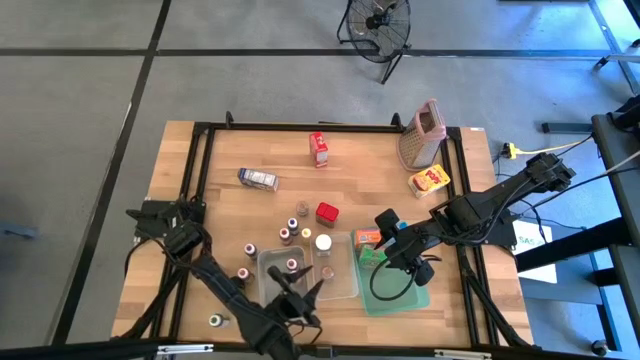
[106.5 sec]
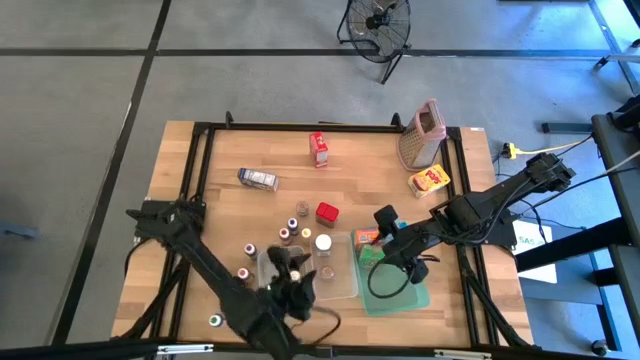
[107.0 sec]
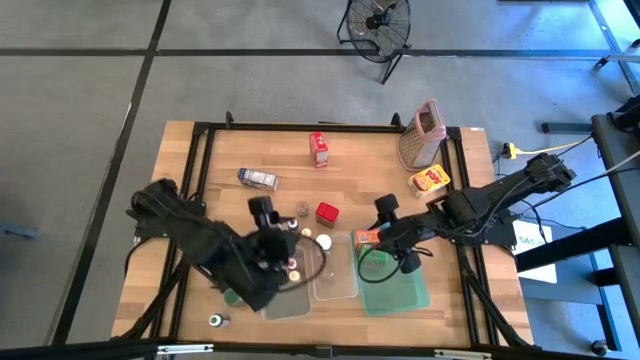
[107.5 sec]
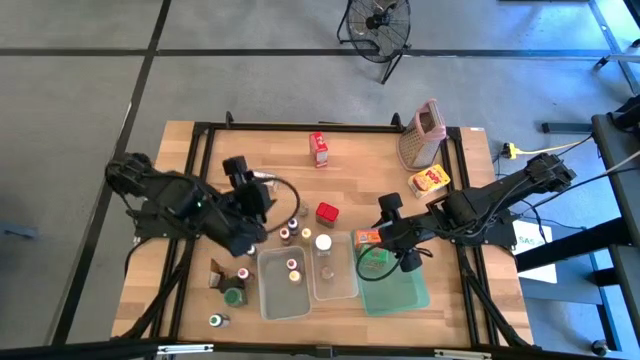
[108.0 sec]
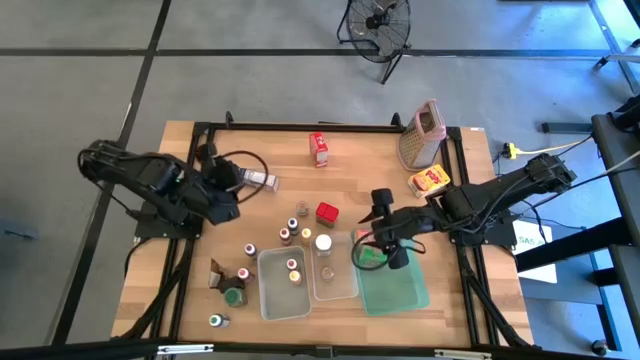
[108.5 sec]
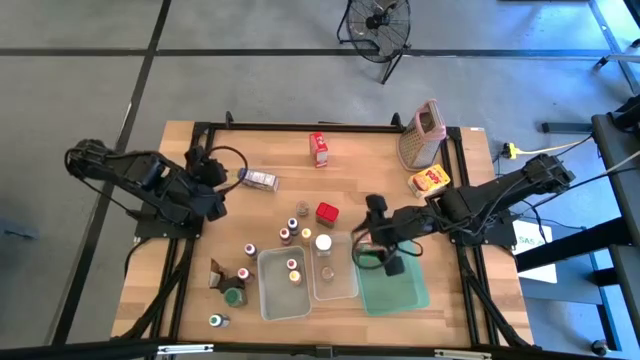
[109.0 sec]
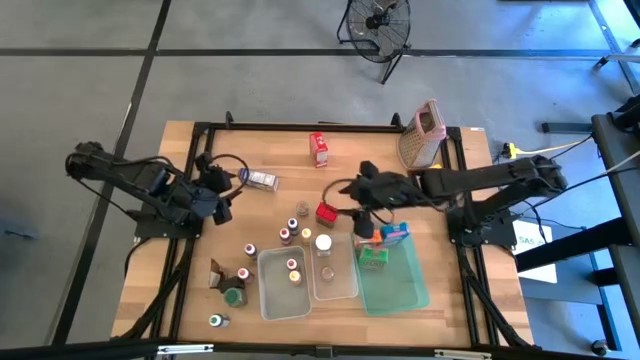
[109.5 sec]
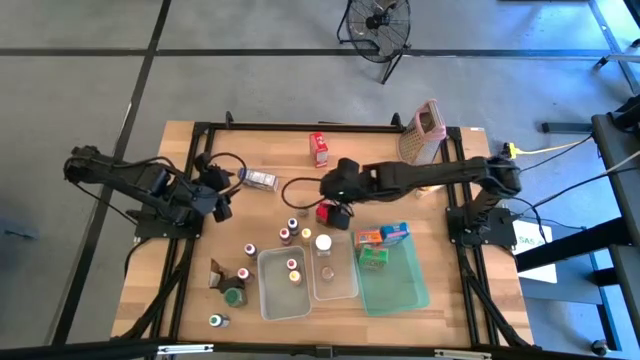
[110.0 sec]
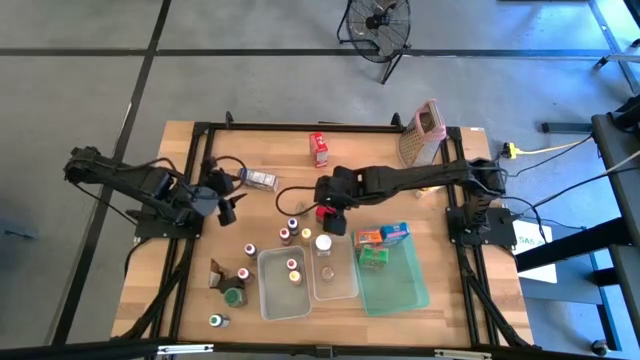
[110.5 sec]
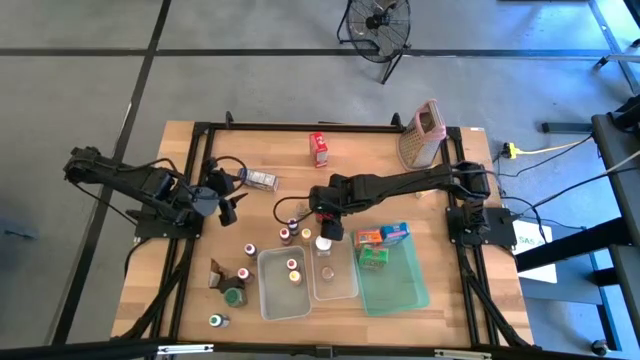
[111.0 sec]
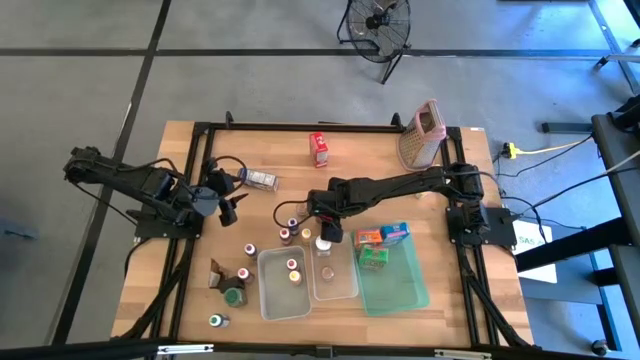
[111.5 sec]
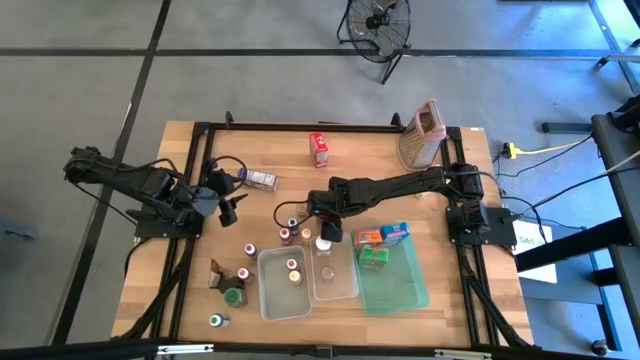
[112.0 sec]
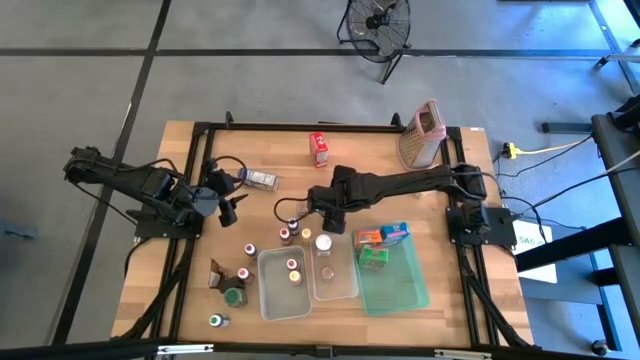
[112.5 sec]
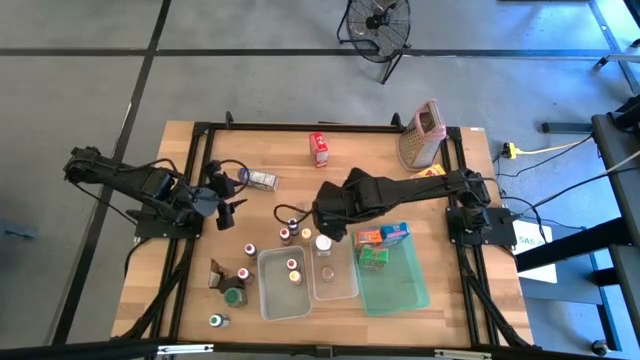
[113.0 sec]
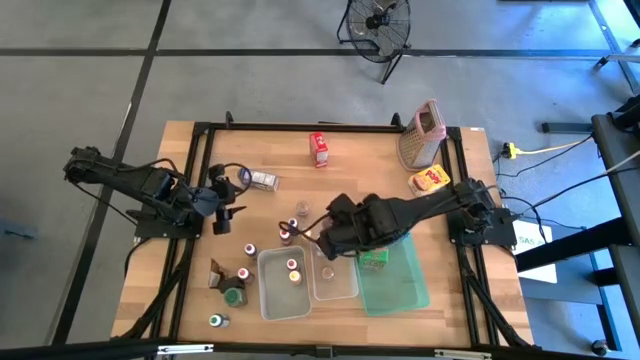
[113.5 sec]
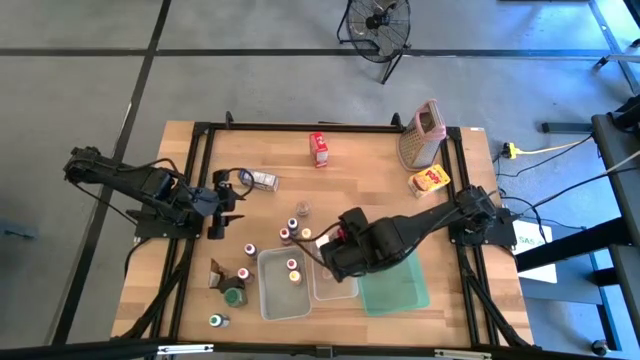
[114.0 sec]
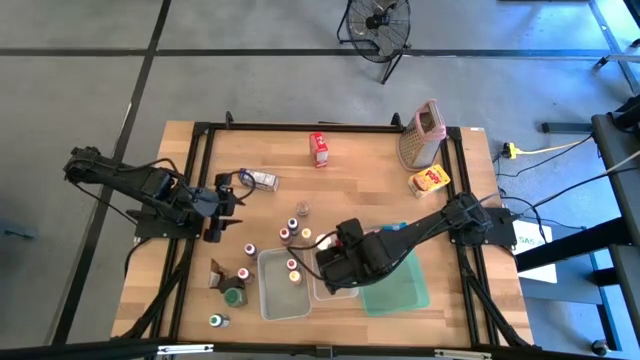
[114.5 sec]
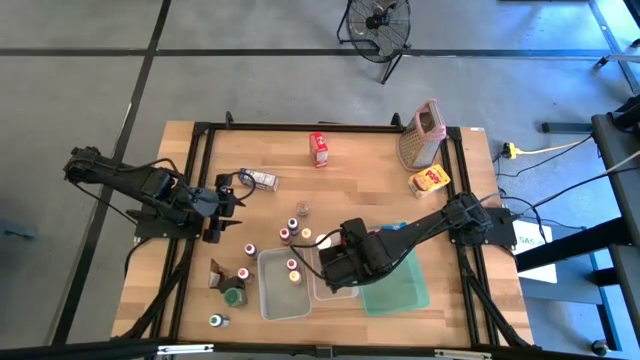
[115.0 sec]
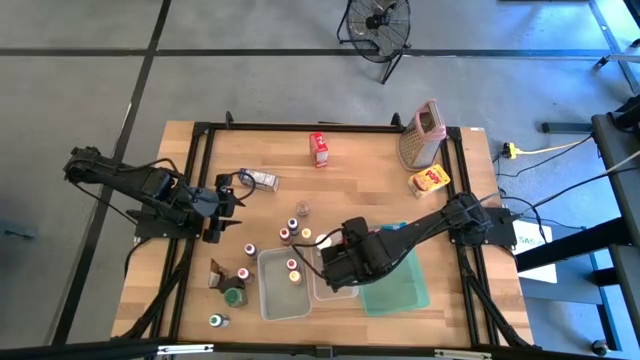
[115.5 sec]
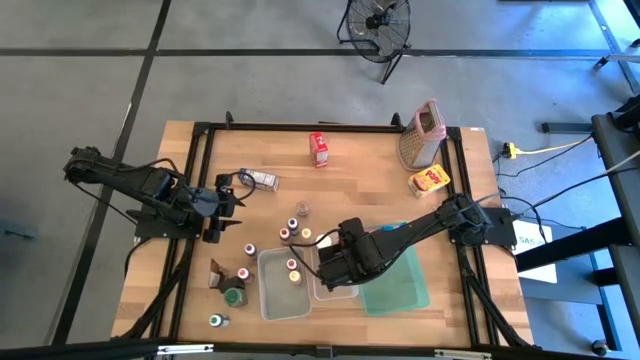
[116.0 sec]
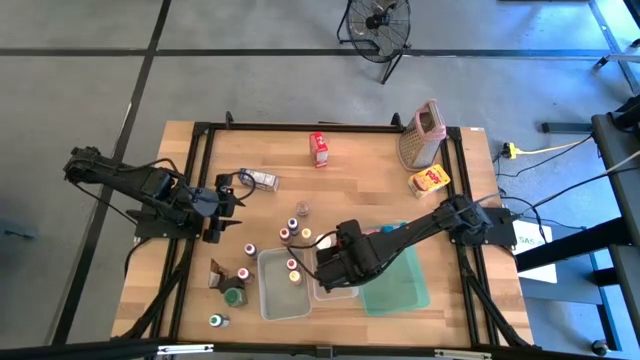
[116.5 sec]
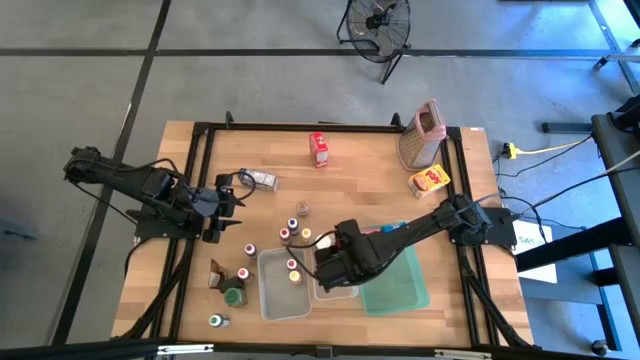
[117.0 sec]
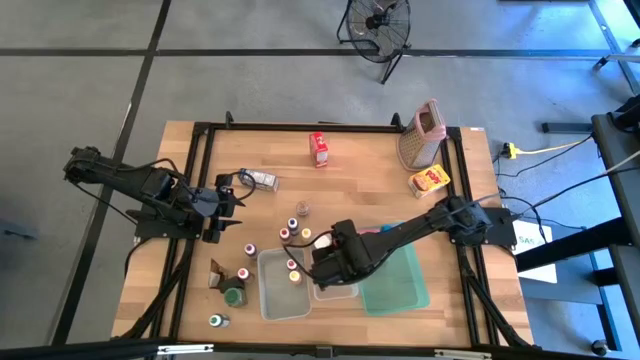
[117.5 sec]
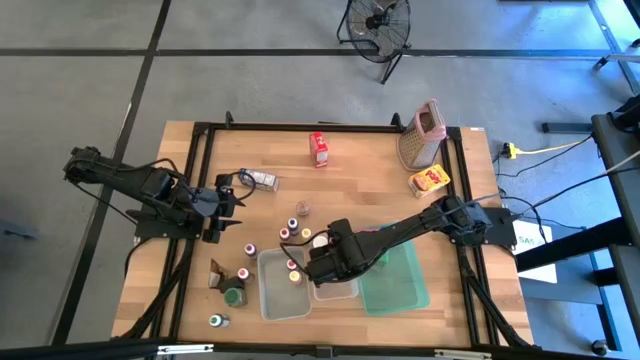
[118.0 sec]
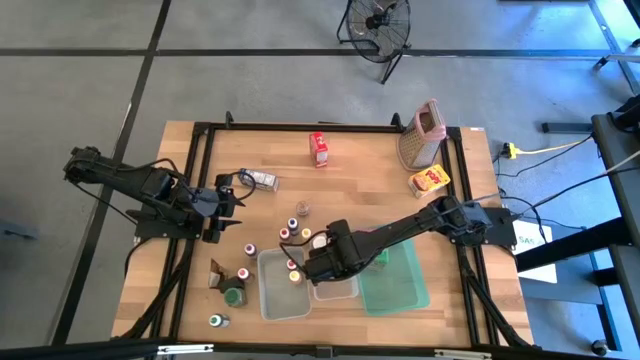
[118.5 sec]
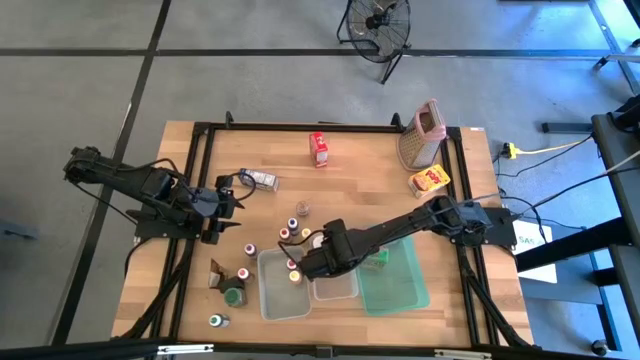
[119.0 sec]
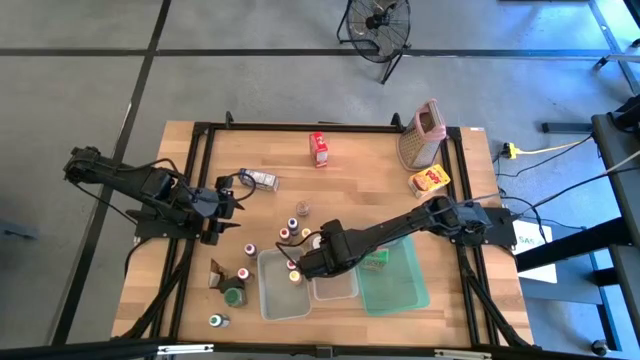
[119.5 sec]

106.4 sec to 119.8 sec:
Task: Pick & Place Kitchen Items
Put the red seasoning can into the transparent bin

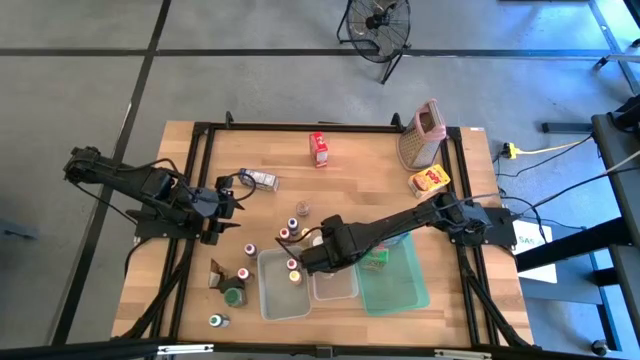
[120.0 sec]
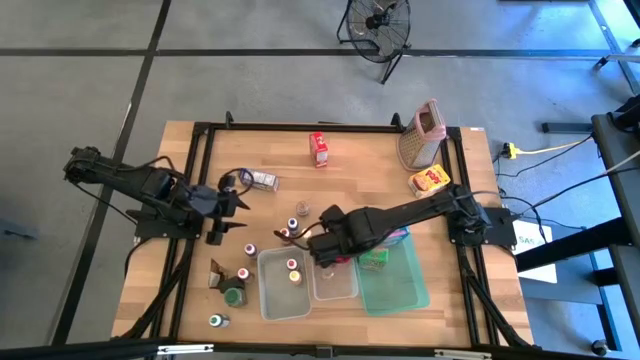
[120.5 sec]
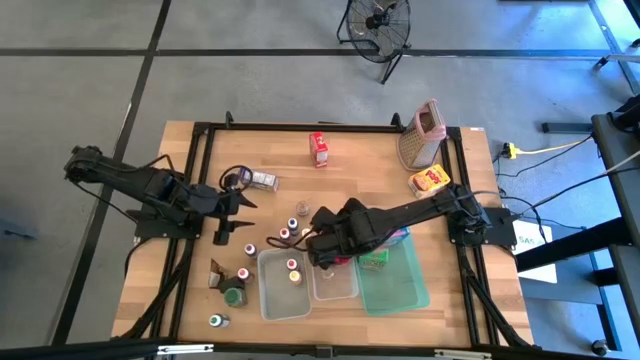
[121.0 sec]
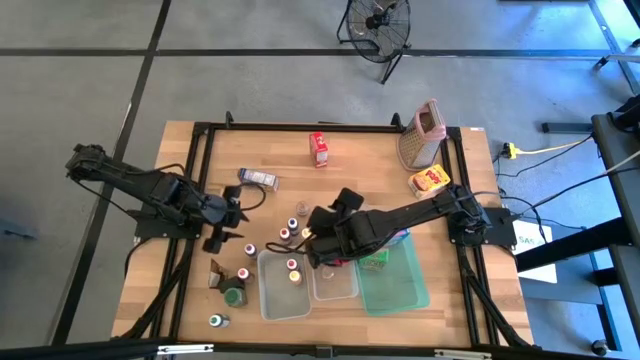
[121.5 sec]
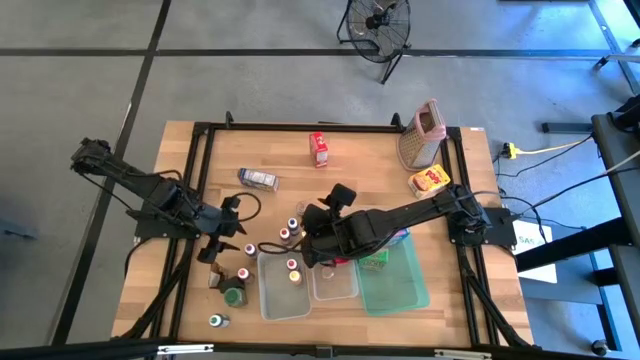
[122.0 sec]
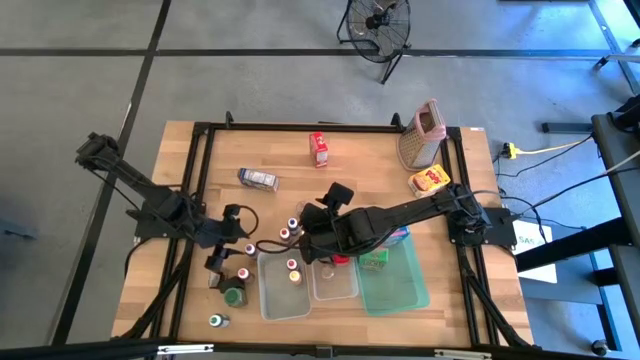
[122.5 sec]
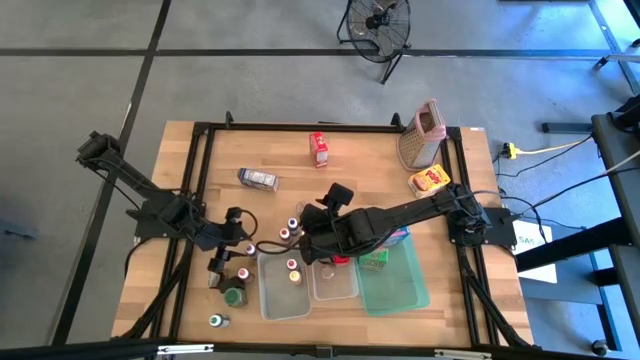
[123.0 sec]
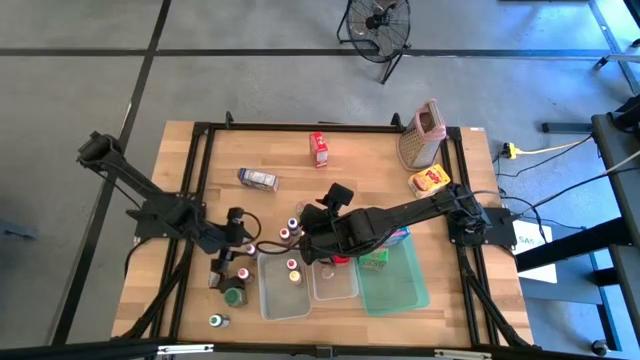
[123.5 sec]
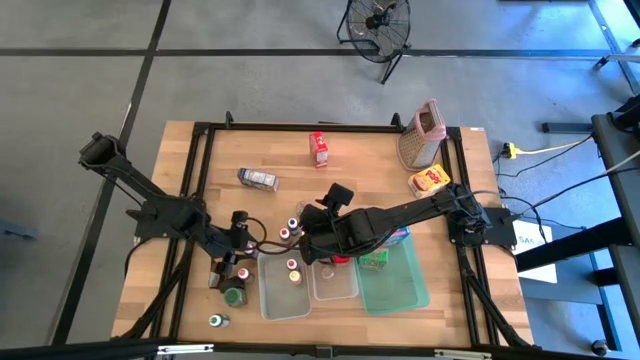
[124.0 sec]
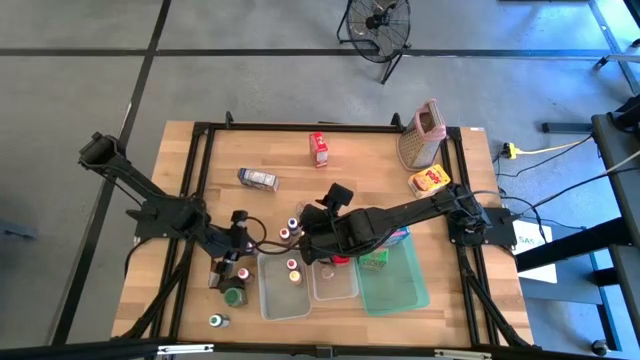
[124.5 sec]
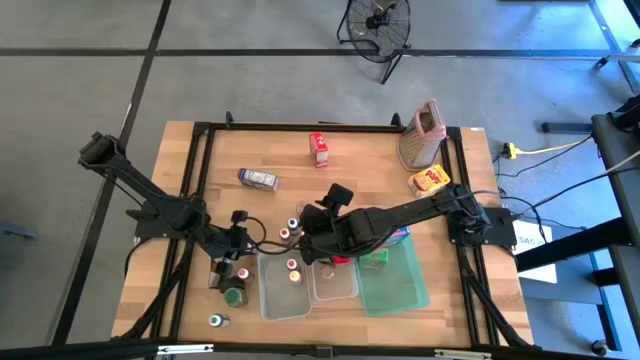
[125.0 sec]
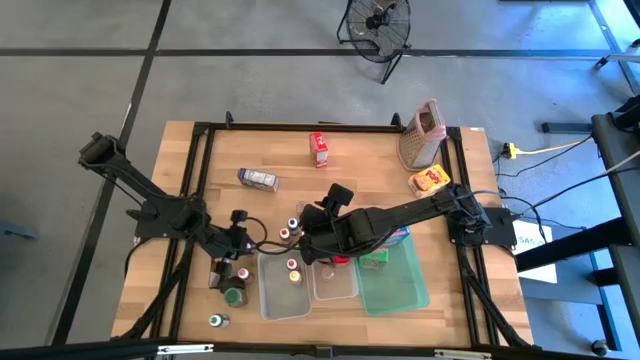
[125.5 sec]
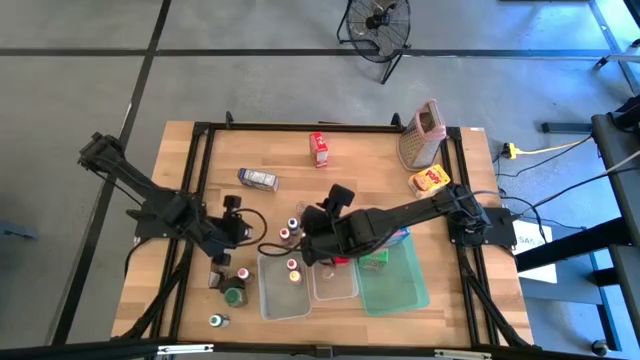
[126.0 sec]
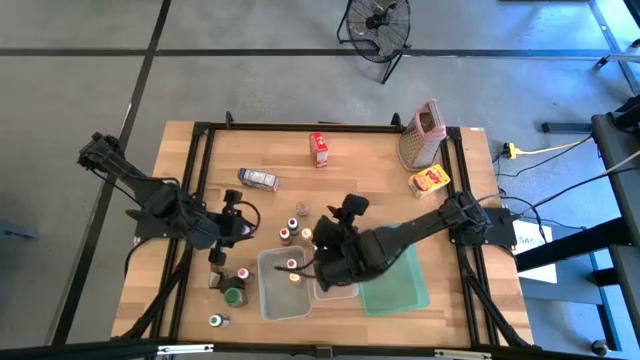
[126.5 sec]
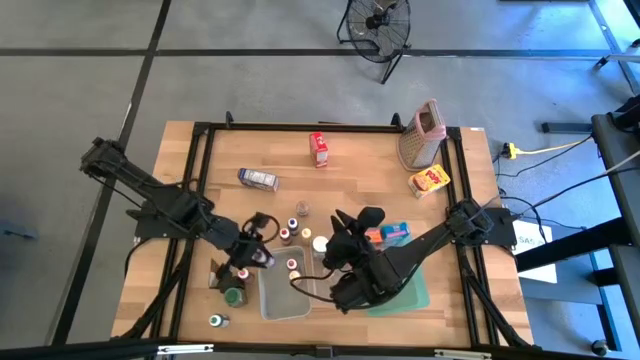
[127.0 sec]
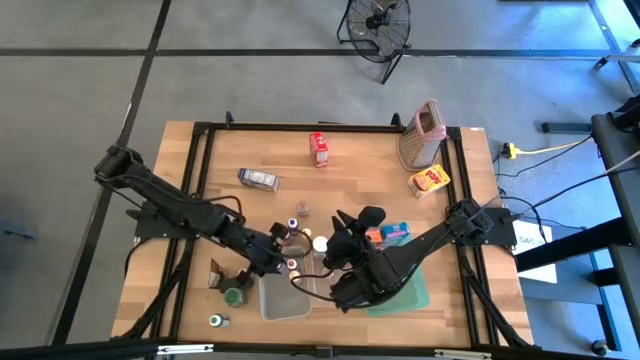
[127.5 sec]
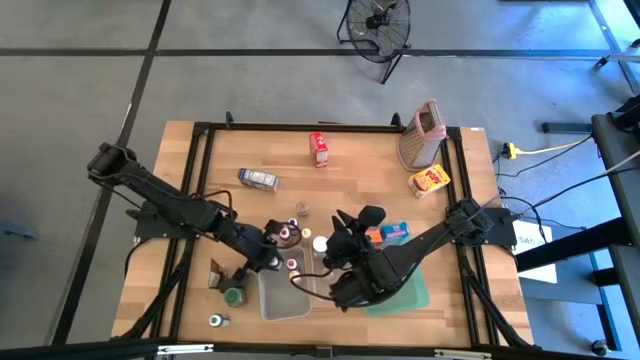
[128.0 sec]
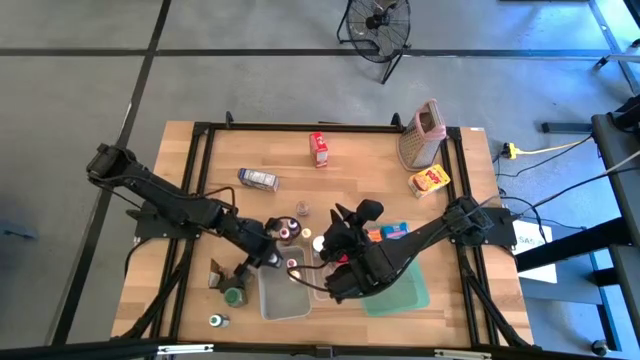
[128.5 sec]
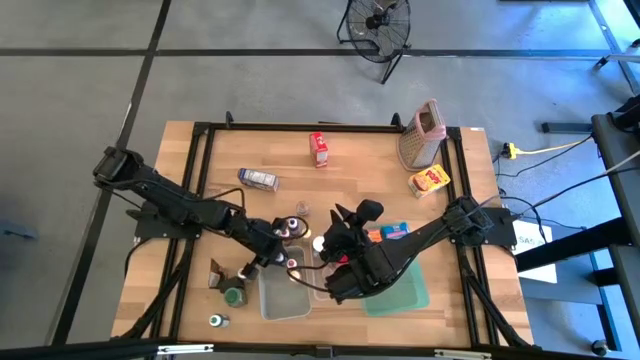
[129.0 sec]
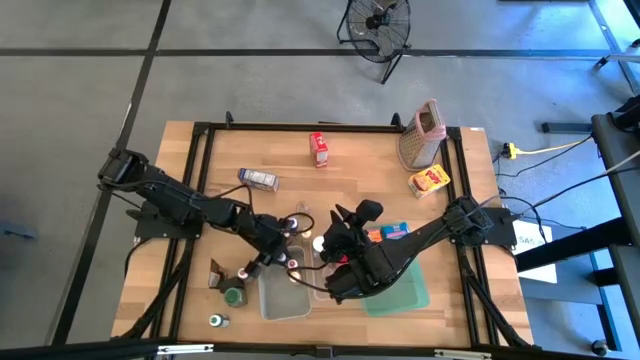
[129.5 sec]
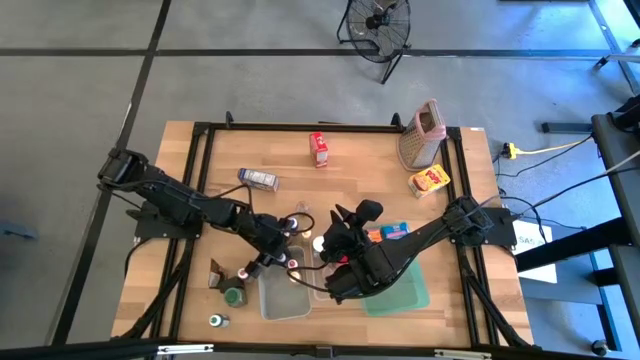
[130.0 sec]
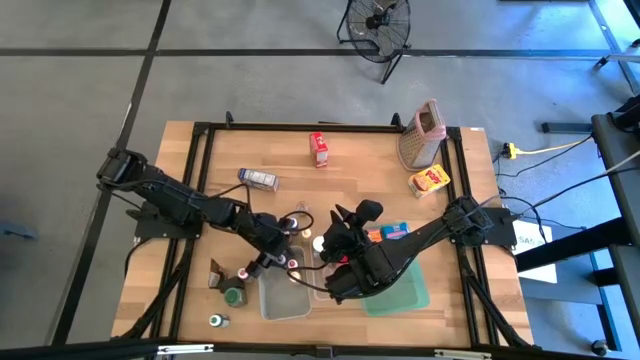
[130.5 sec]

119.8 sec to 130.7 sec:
Put the purple food coloring bottle into the gray bin
